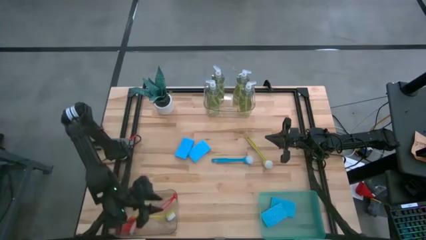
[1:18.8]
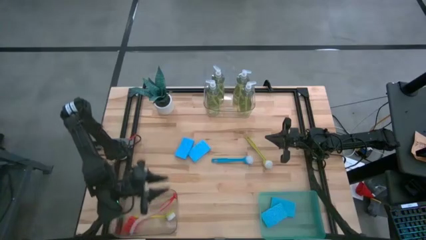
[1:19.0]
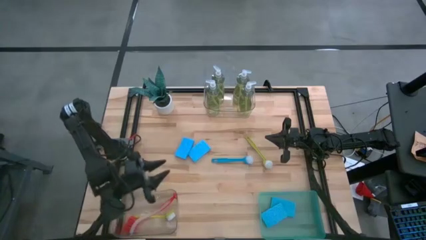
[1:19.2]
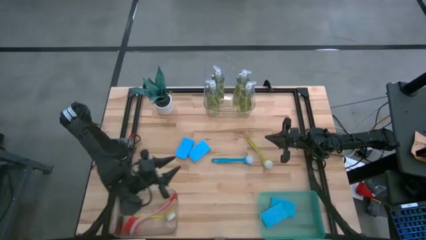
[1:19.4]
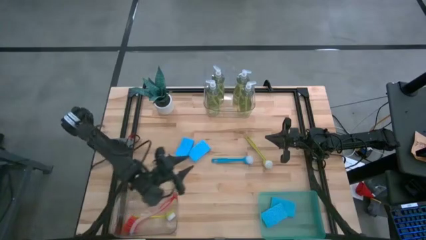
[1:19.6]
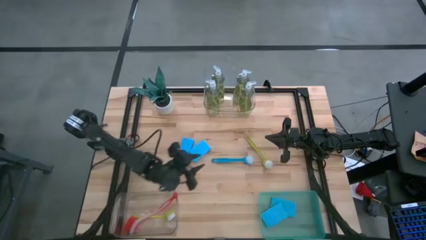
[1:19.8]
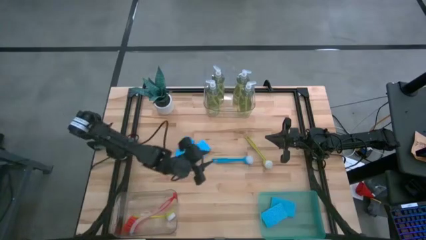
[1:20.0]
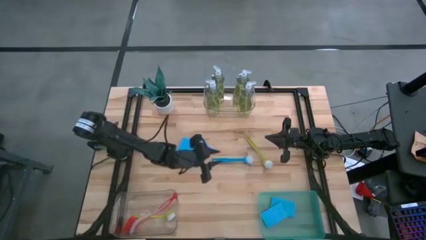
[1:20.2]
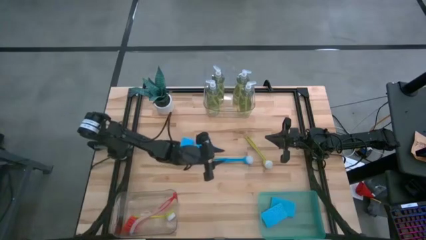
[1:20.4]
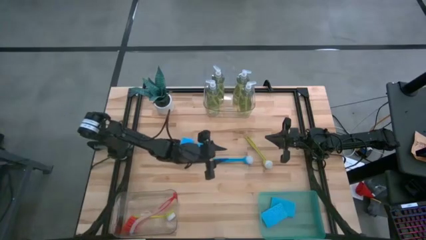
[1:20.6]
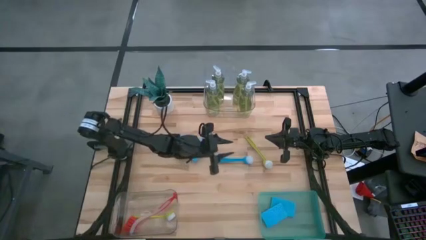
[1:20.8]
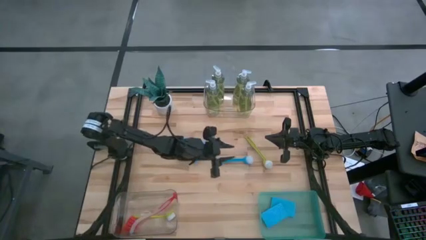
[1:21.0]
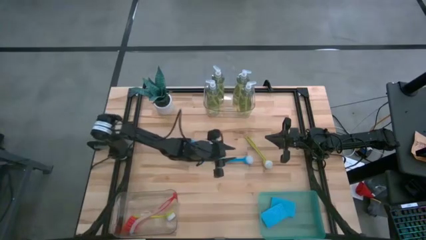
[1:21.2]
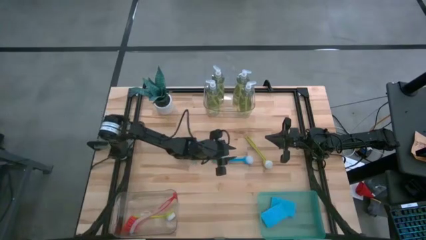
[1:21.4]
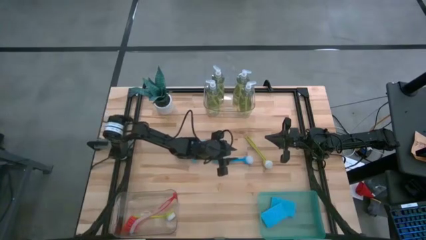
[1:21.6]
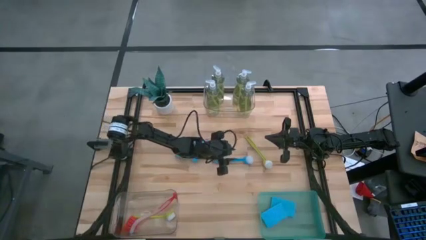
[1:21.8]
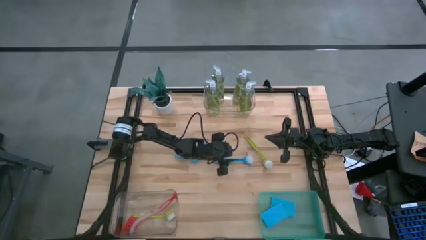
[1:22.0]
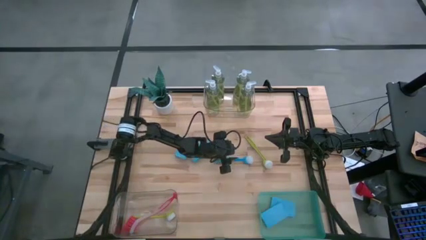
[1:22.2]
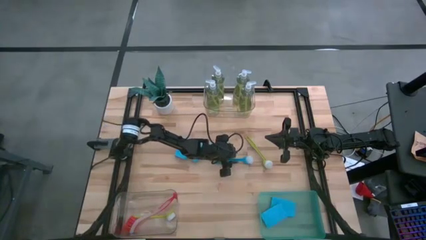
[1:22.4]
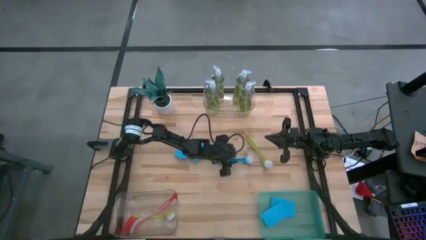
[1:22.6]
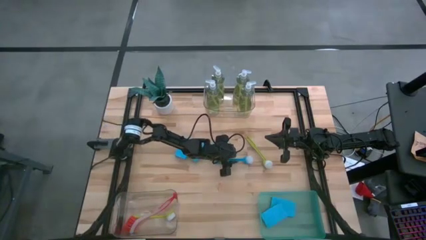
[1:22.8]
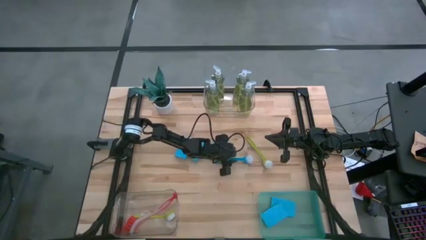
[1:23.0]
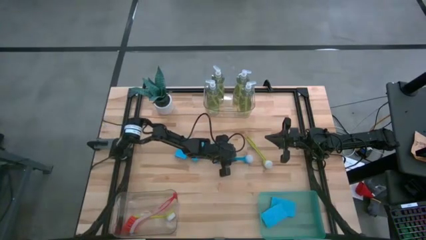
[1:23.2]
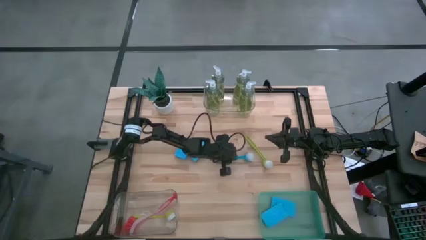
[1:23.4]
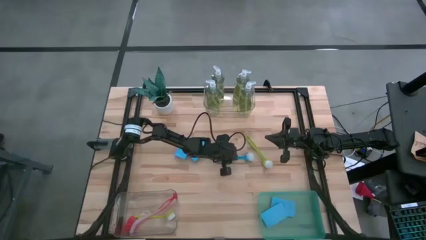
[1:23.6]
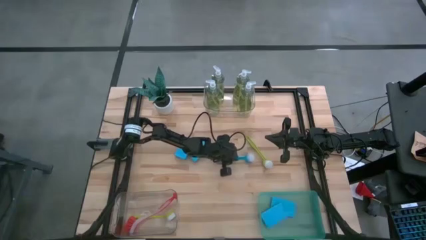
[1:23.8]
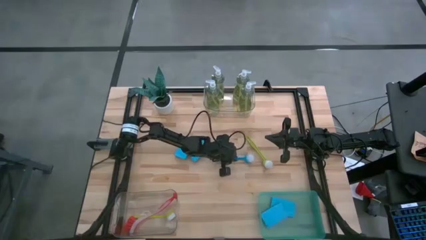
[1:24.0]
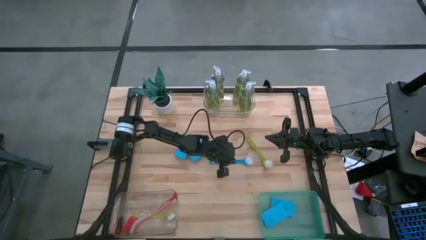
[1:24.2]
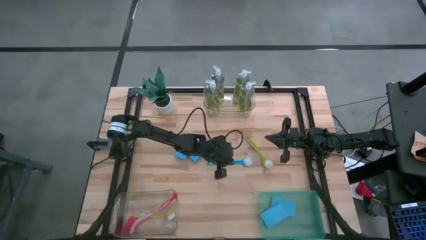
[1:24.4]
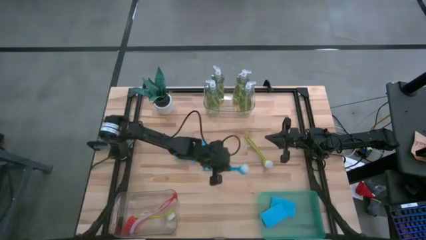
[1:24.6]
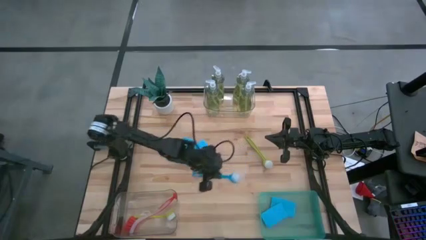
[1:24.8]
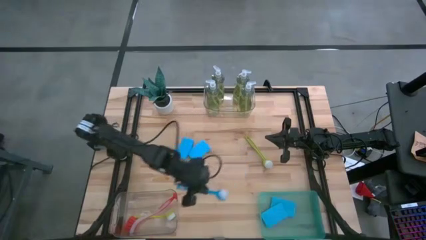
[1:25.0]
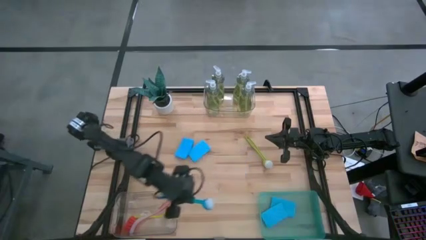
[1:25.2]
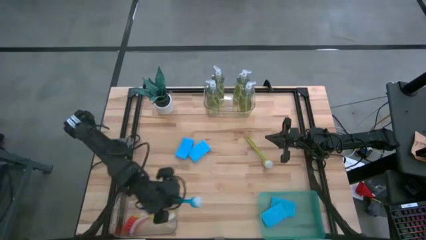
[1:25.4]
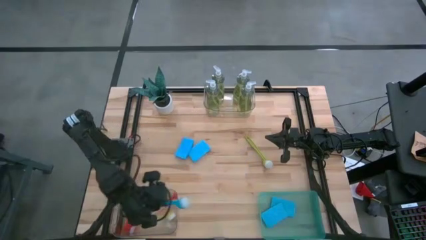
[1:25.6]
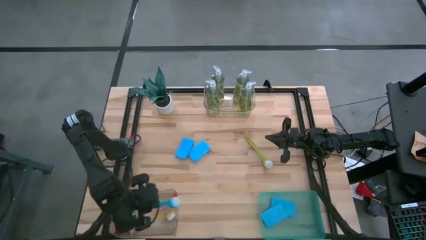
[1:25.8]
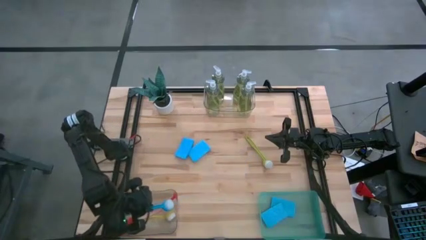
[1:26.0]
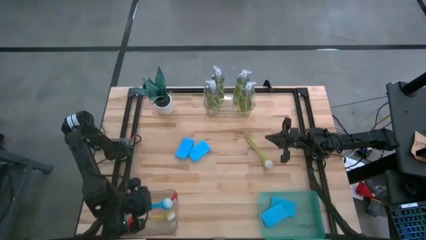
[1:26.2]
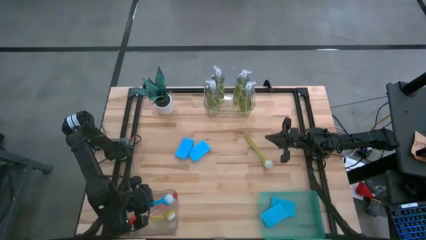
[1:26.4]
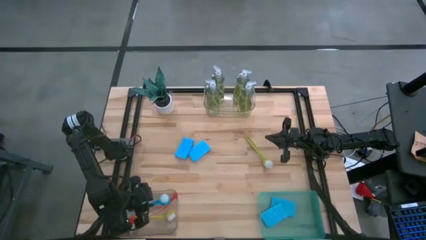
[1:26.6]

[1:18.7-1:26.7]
Task: Pick & Place Kitchen Sink Supplies
Put the blue dish brush into the bottom transparent bin

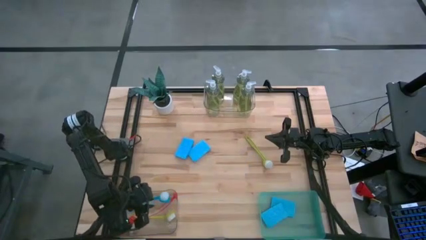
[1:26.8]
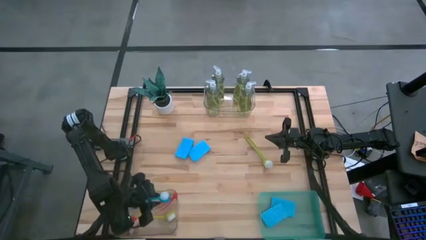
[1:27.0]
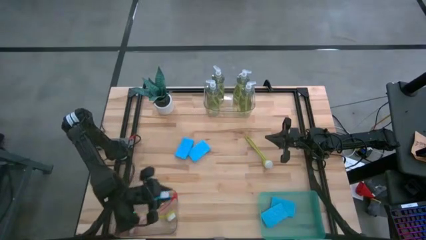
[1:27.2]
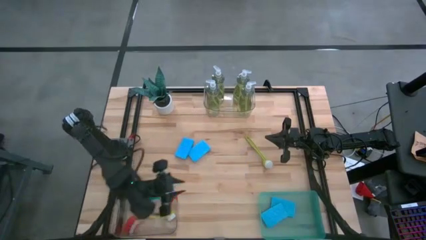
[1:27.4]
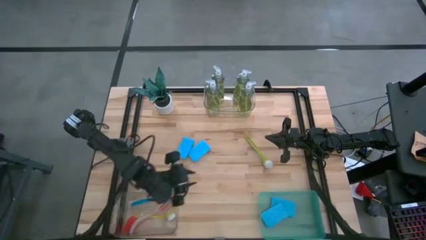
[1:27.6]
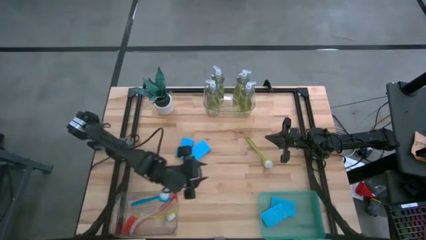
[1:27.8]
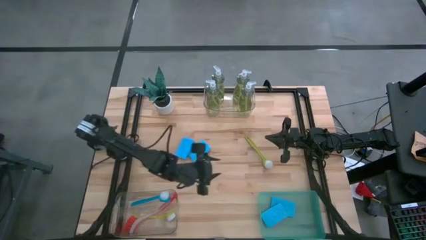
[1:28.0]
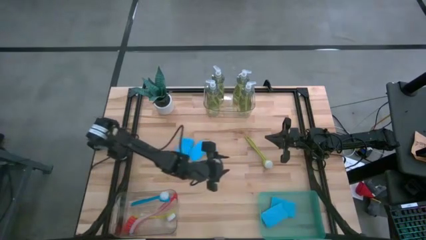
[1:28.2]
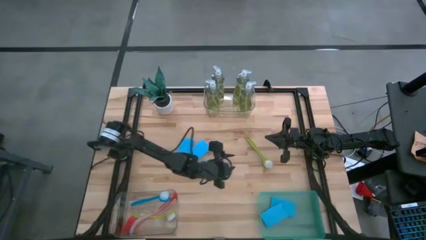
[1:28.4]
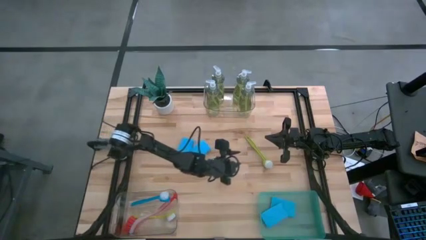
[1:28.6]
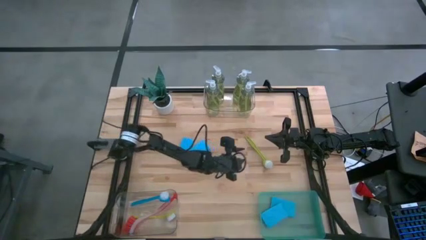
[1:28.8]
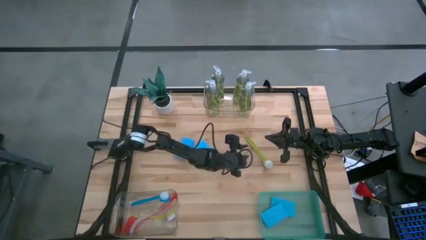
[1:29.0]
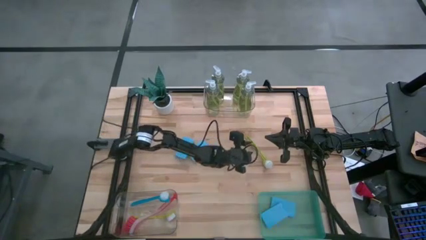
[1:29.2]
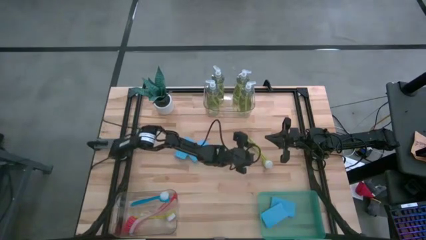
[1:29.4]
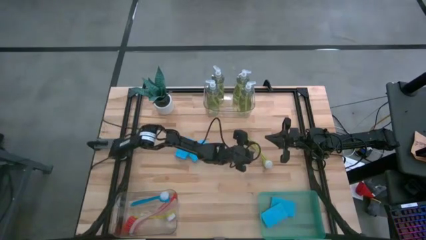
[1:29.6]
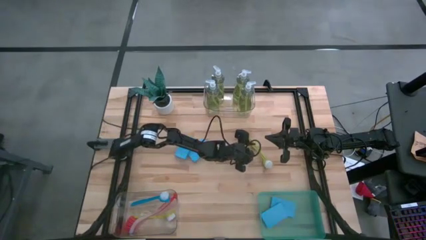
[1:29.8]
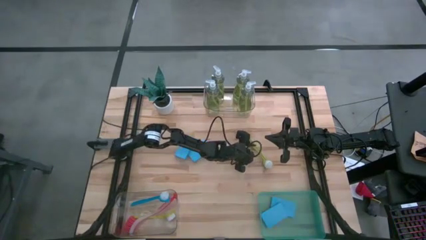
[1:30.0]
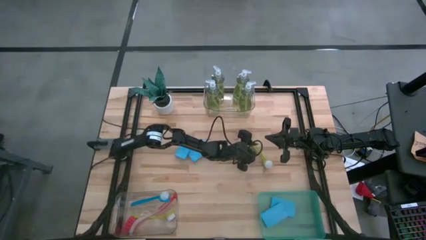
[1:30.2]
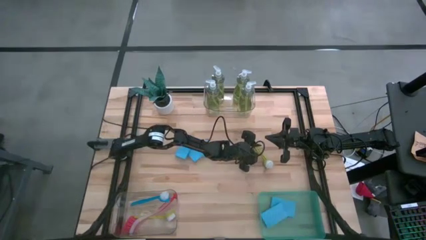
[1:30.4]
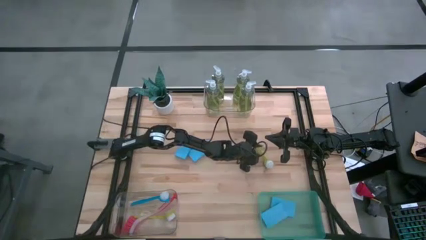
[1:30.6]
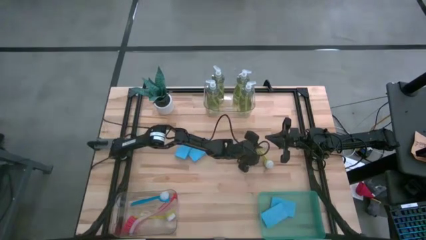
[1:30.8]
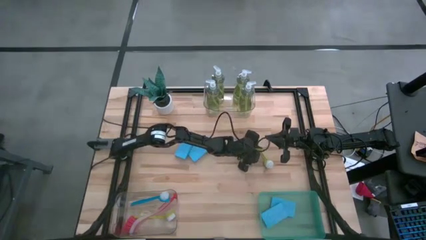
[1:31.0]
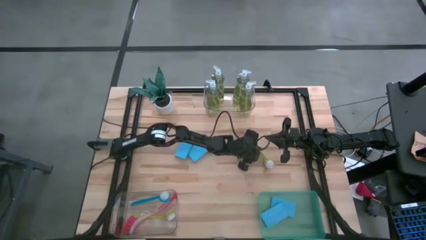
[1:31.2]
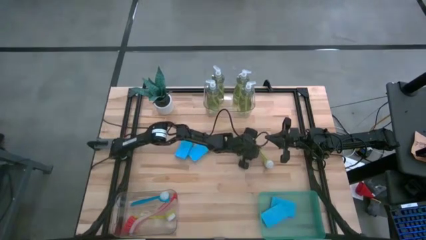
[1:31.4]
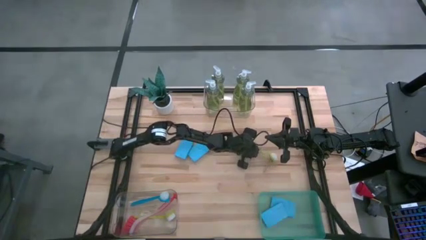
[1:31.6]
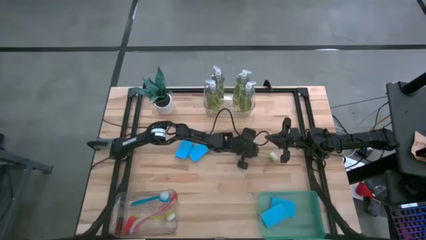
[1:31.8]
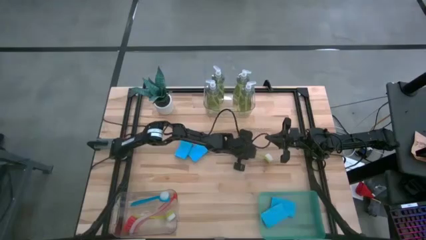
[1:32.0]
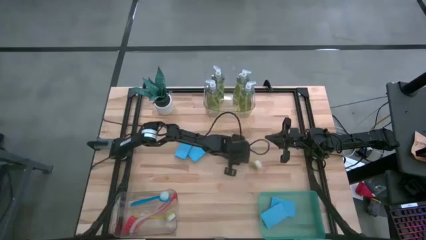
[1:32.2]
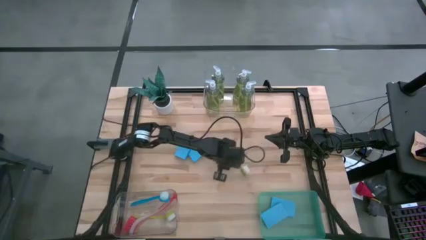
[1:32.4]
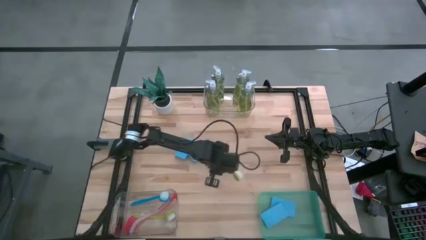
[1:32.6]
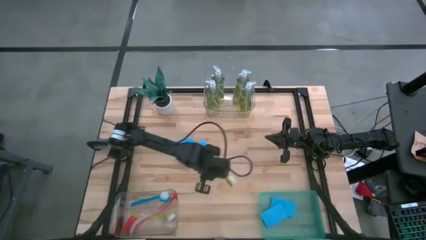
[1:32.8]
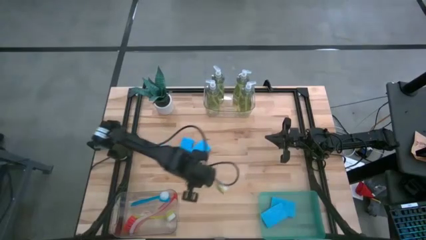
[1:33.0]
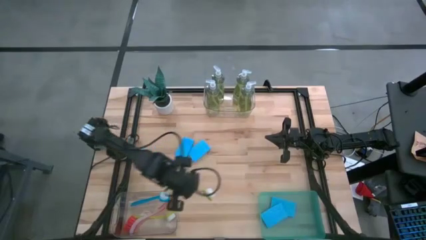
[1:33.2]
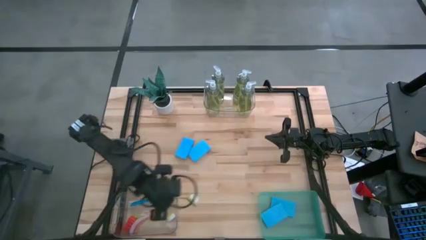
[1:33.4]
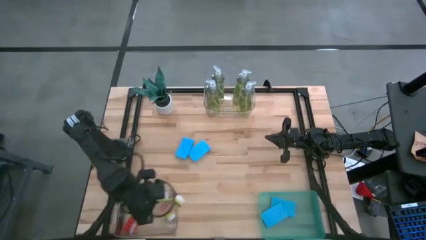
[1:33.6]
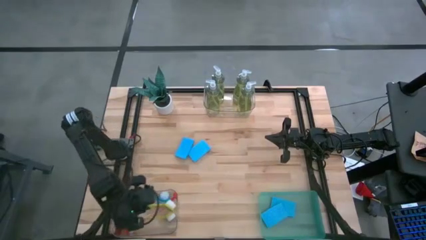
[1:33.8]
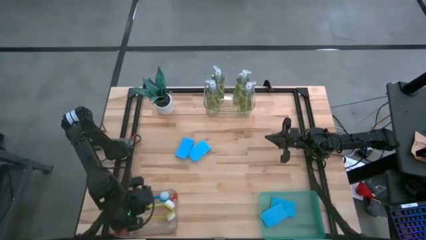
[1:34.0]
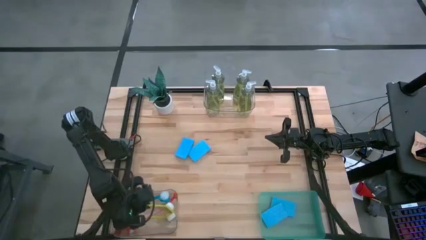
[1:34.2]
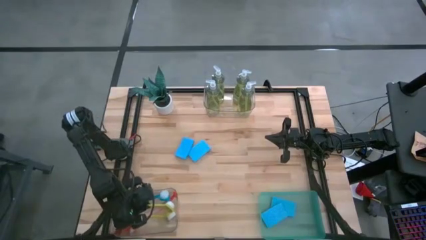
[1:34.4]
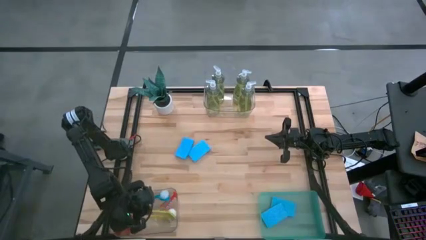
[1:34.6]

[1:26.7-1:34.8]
Put the green dish brush into the bottom transparent bin
